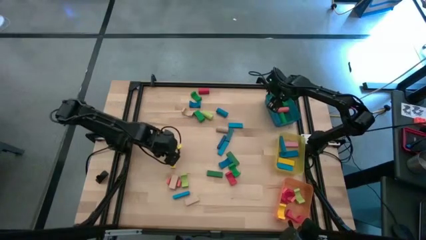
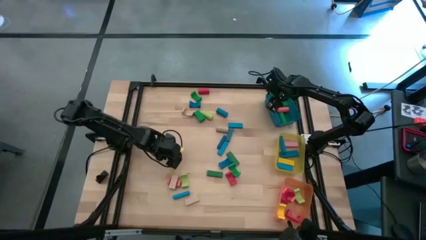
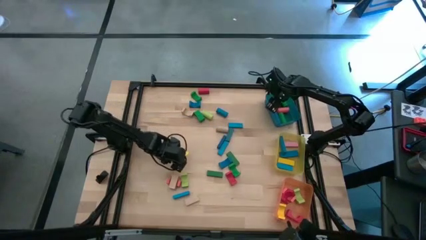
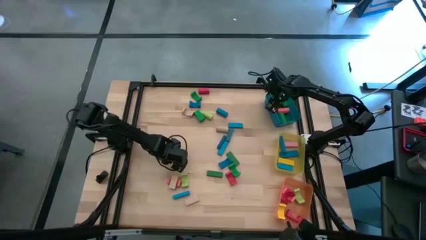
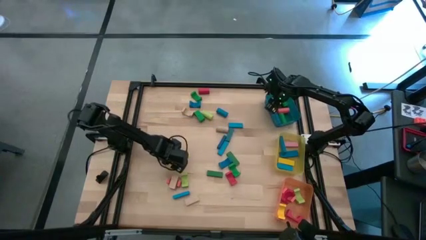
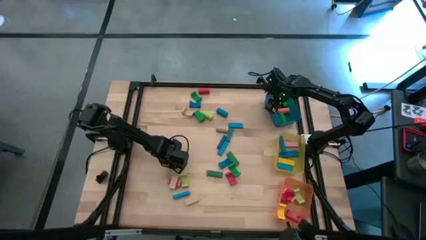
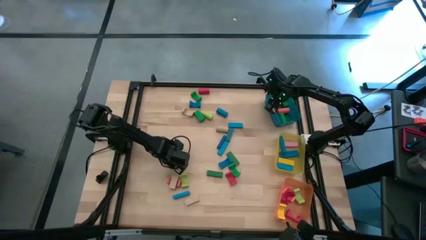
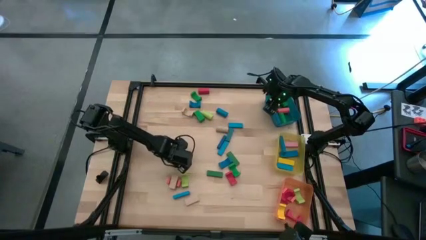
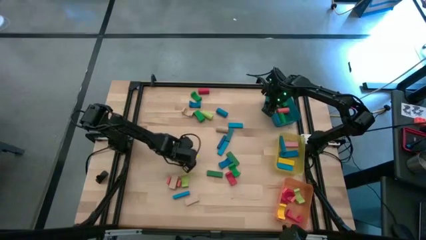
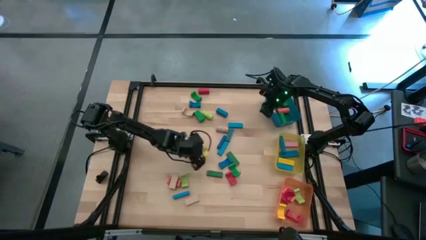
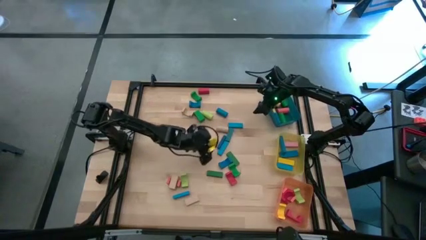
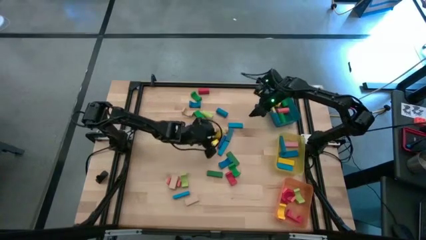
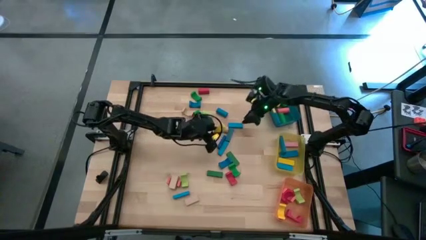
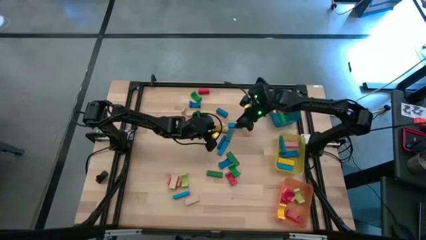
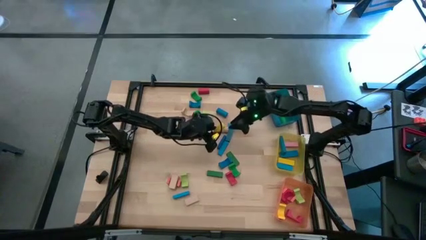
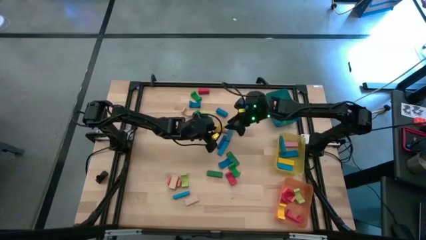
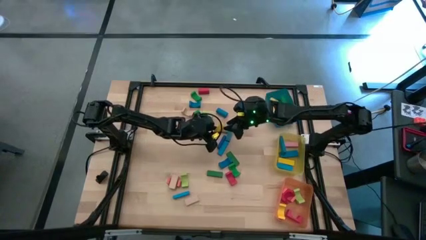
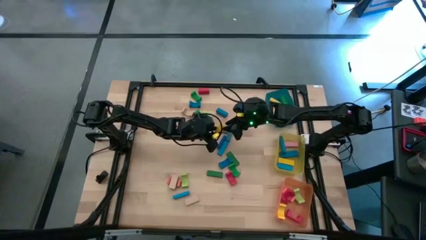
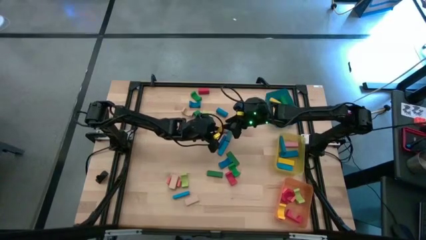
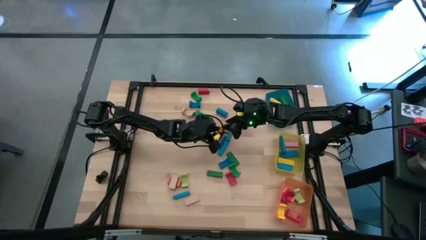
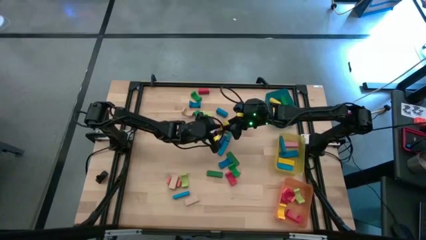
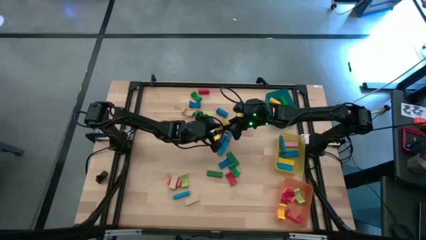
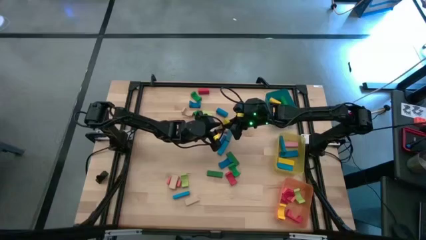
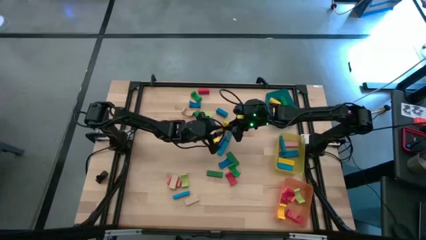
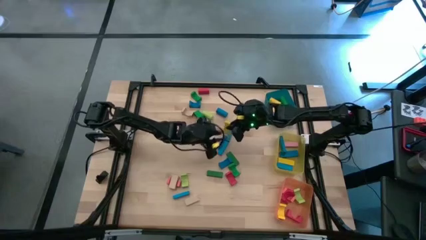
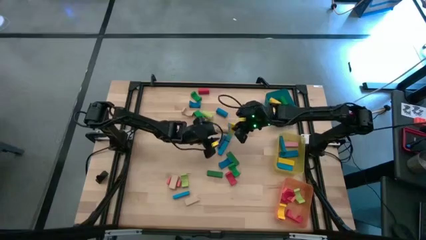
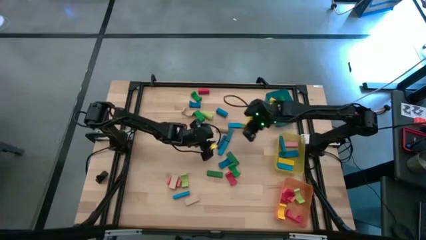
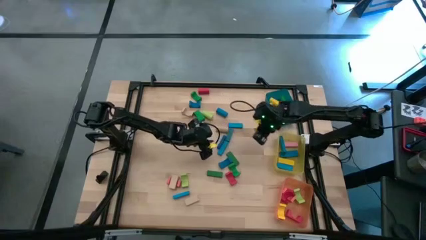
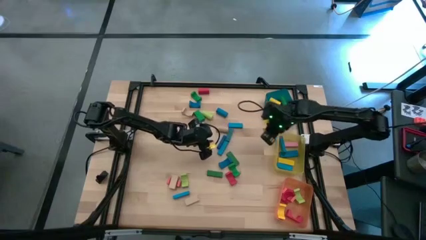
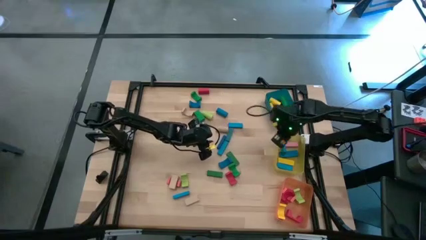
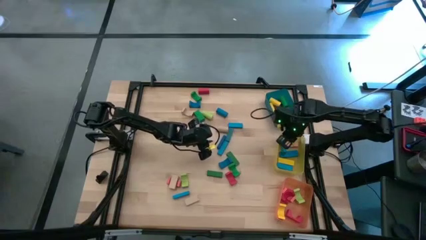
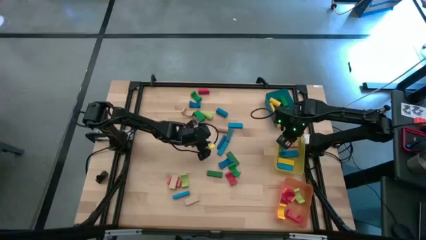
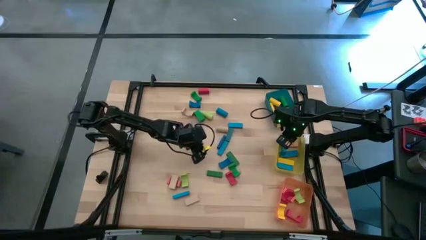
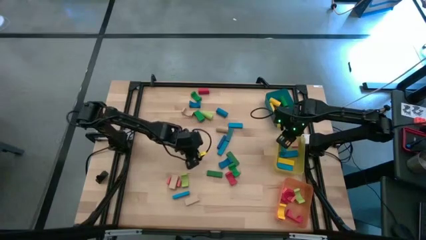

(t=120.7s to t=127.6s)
Task: Sort blocks by size
Put the yellow rectangular block into the yellow bin

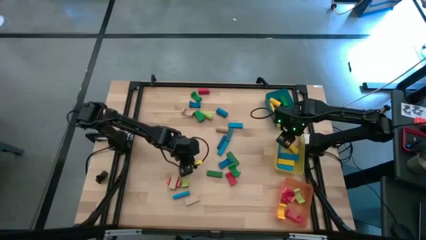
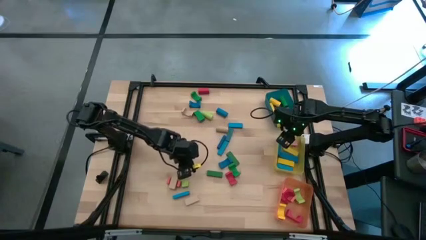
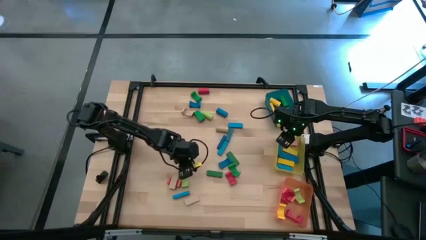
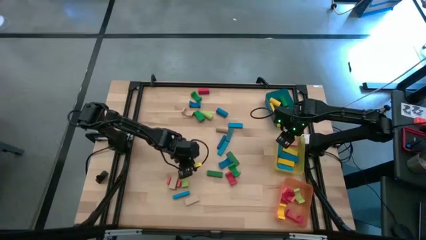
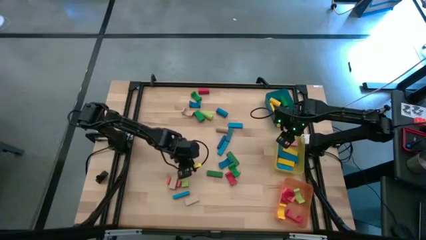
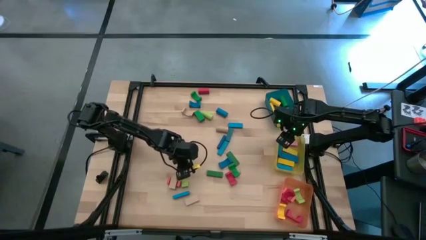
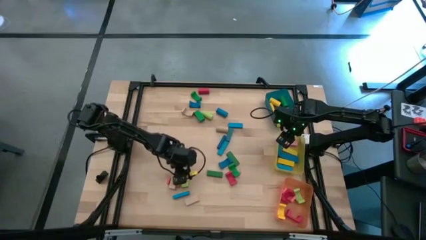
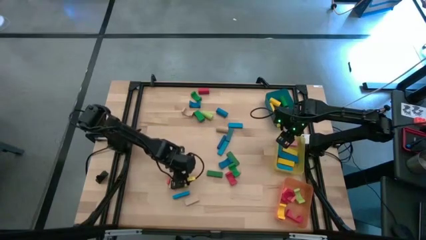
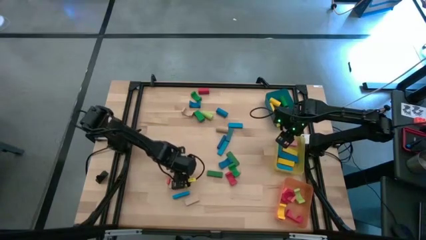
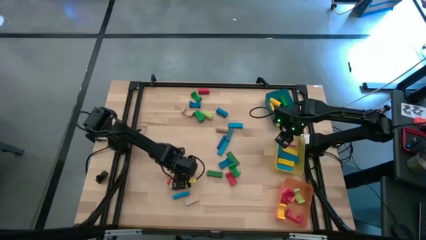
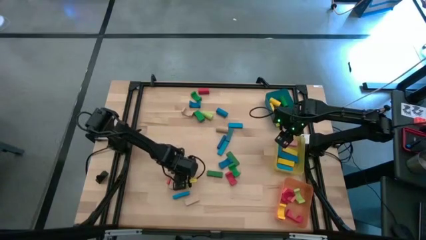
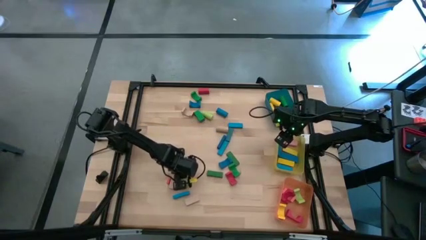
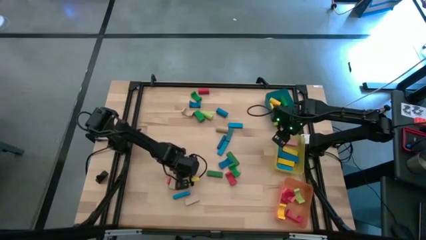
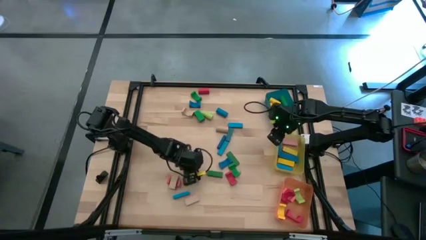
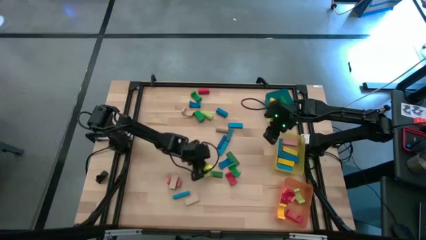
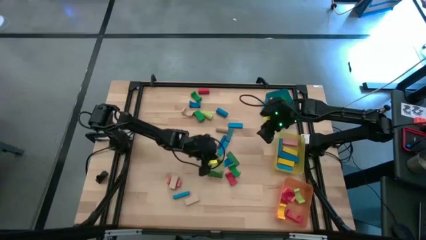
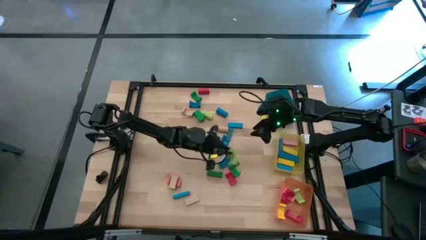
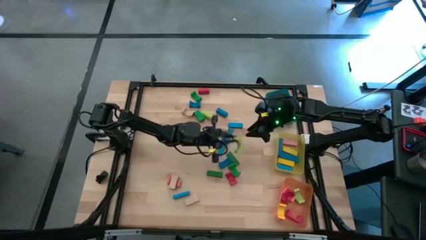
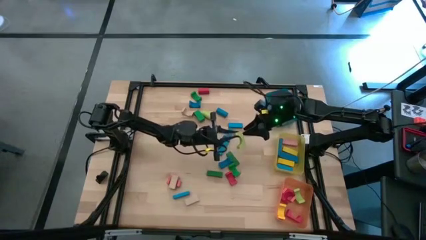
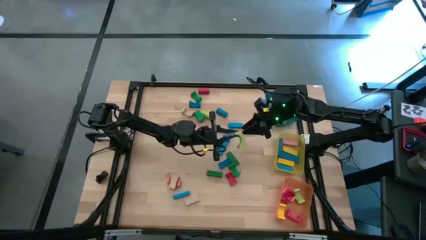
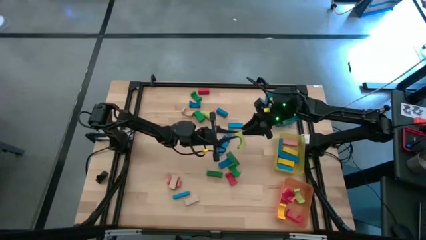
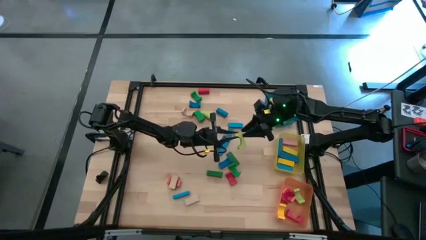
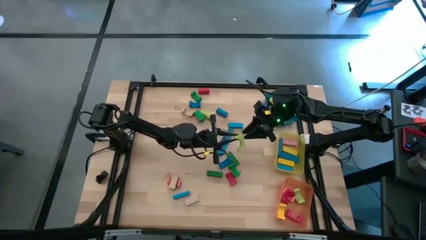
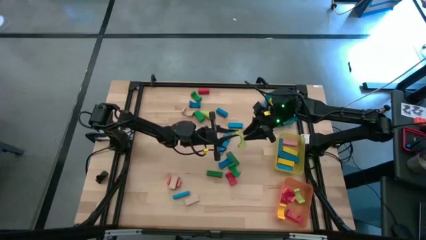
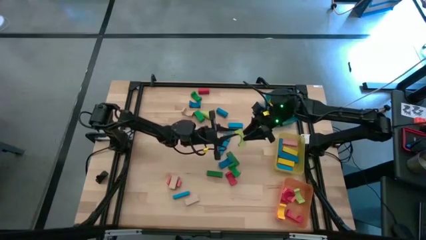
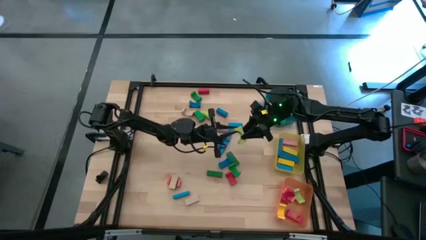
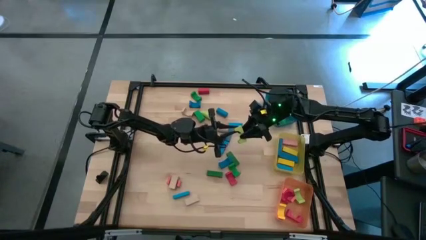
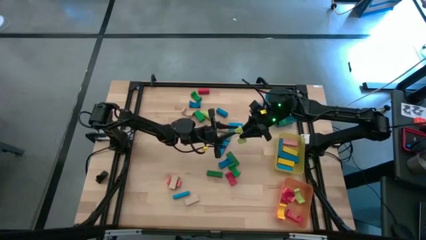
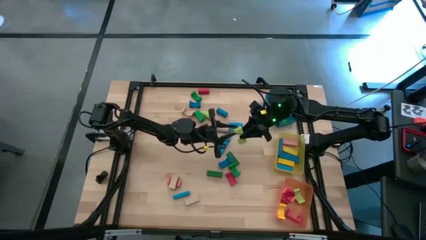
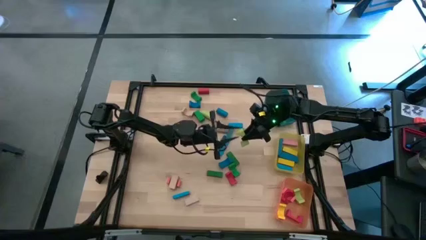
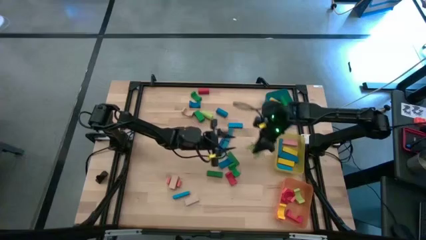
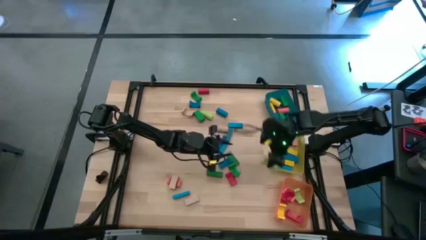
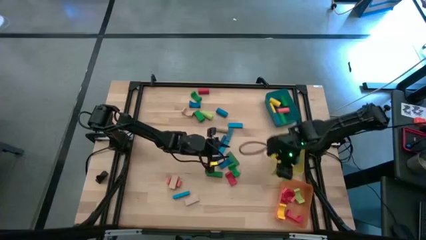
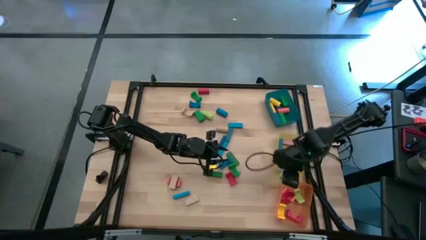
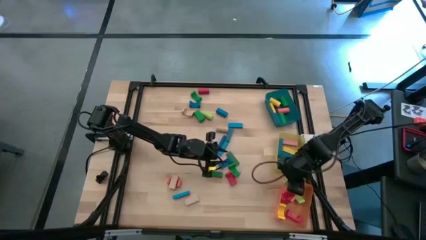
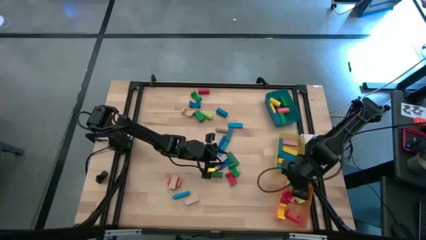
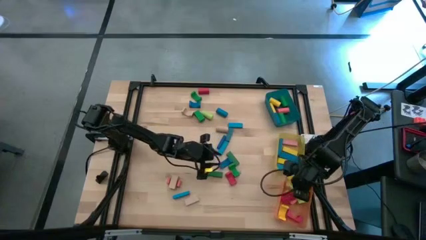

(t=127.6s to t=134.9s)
Put the light green arch block into the orange bin

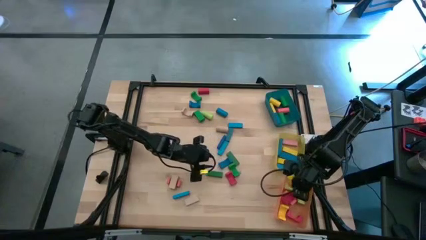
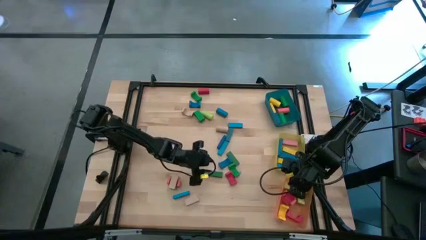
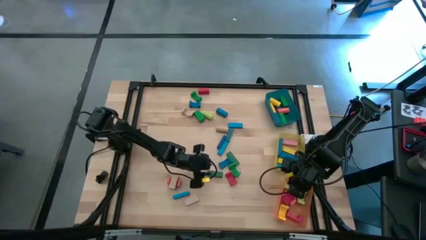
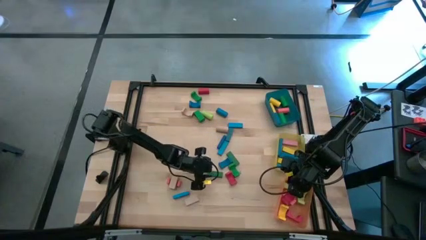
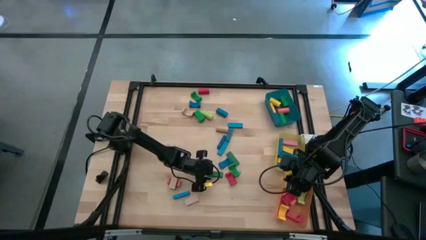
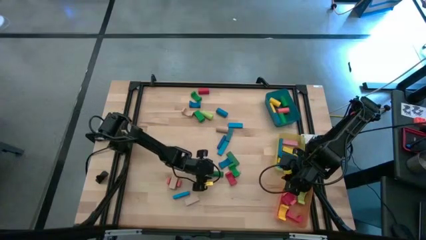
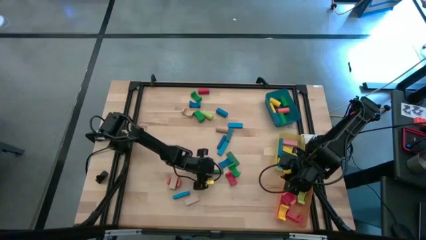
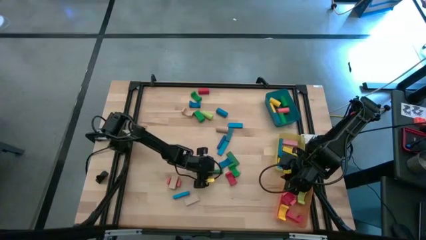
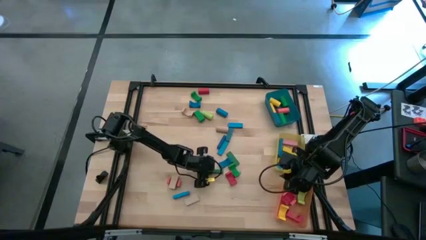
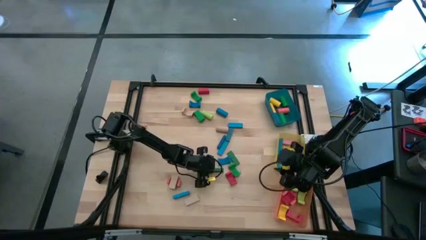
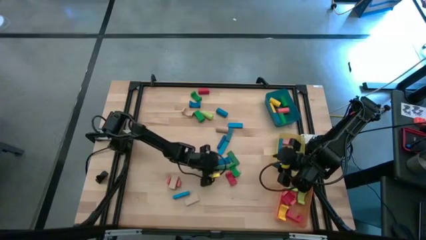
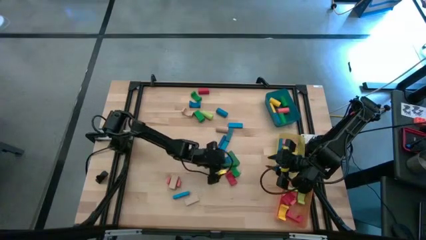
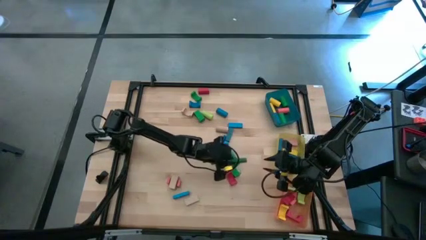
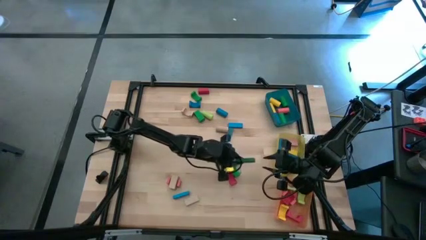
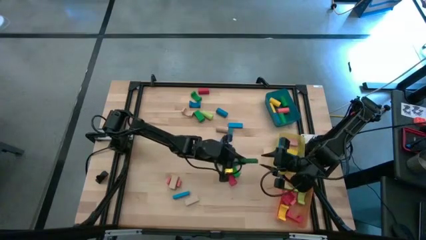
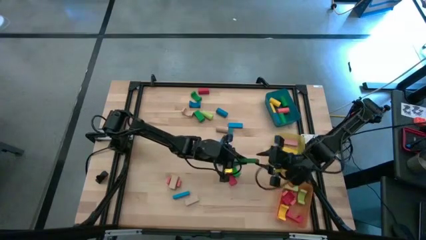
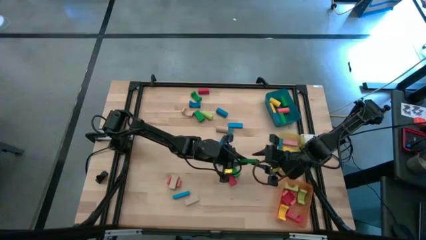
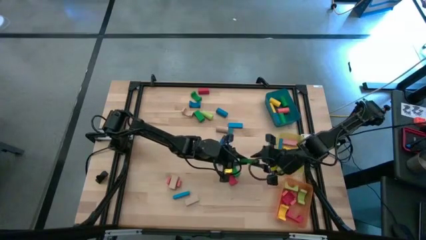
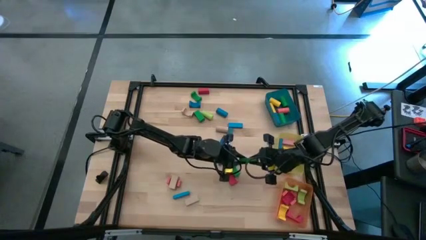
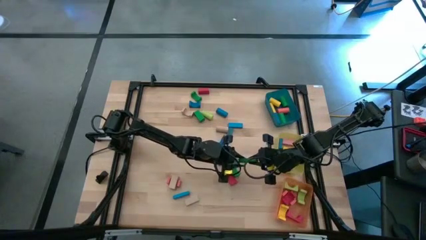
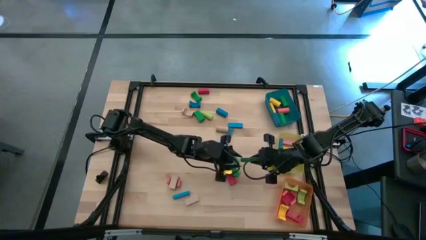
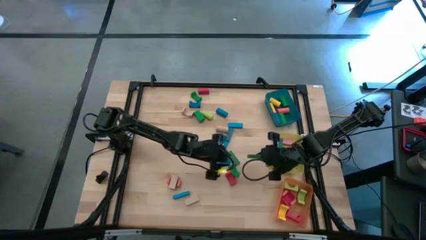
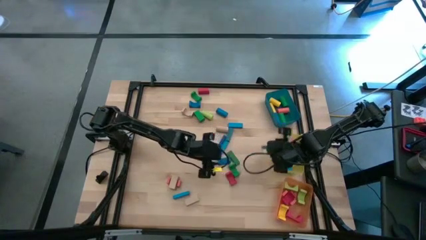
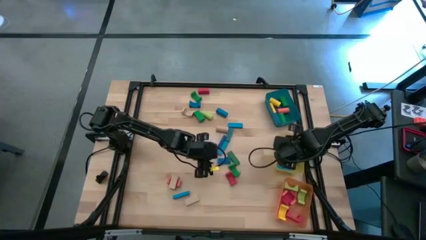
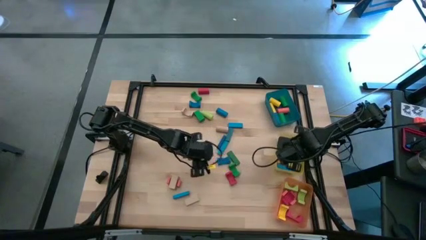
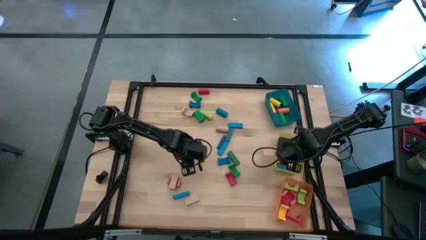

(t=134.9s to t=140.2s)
Put the green rectangular block into the yellow bin
